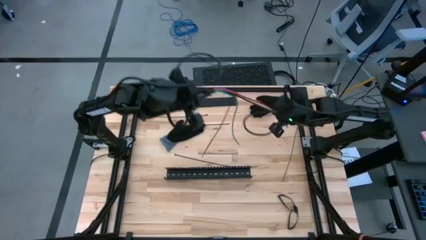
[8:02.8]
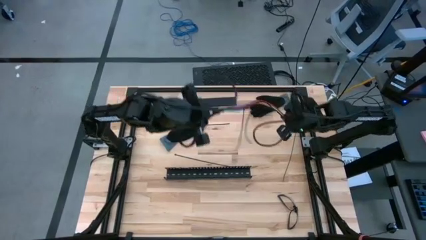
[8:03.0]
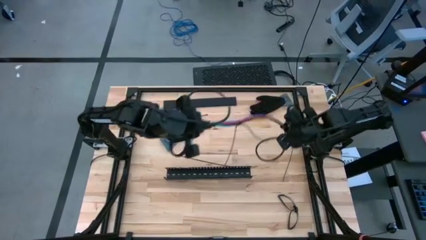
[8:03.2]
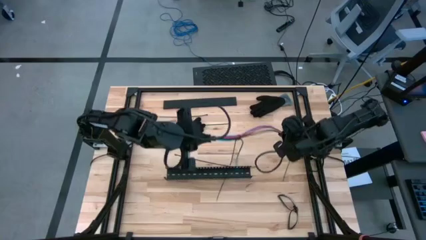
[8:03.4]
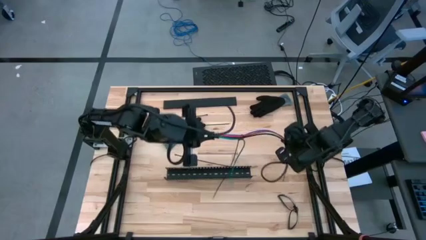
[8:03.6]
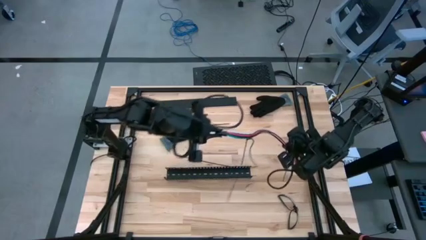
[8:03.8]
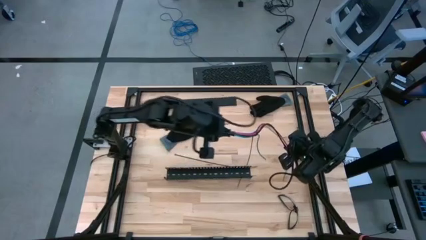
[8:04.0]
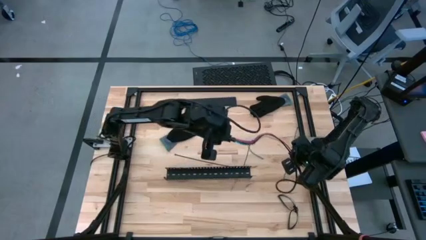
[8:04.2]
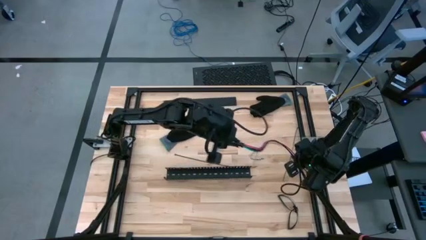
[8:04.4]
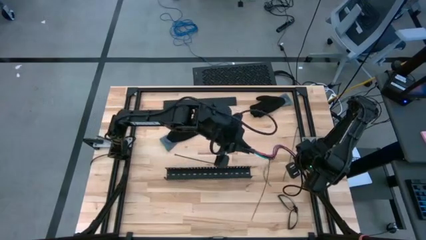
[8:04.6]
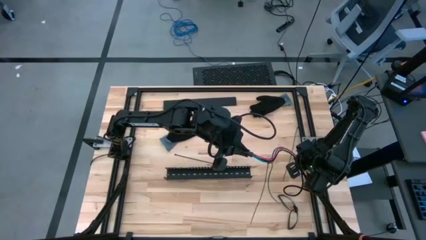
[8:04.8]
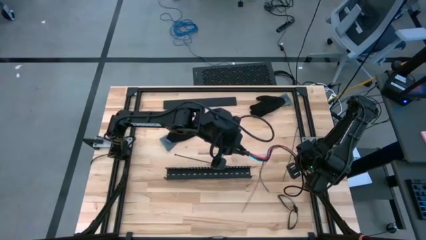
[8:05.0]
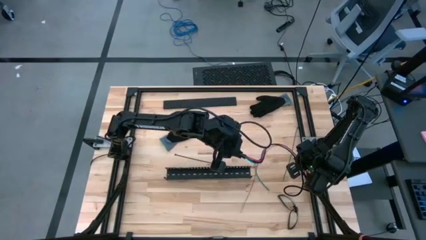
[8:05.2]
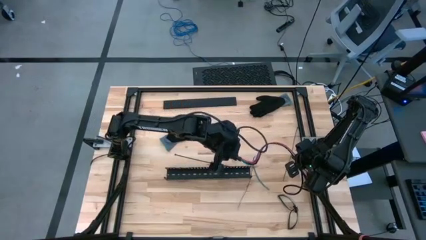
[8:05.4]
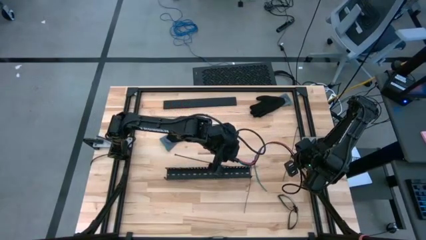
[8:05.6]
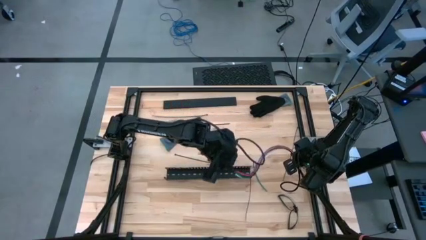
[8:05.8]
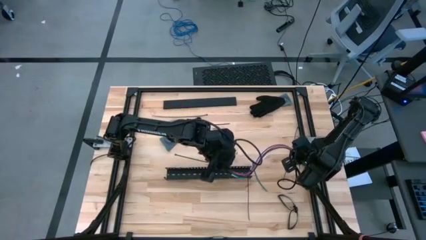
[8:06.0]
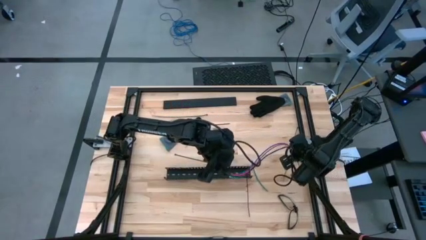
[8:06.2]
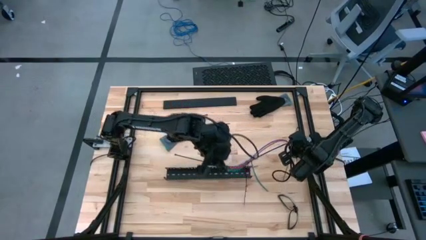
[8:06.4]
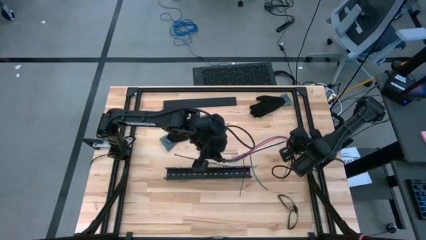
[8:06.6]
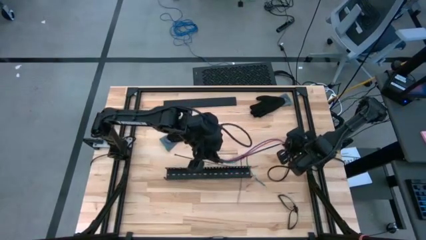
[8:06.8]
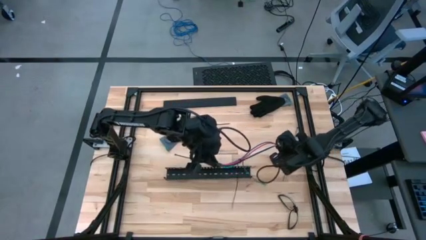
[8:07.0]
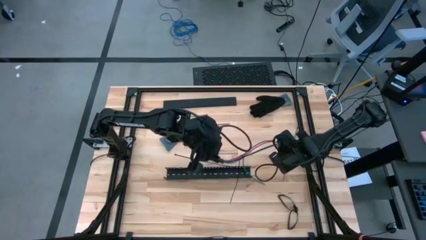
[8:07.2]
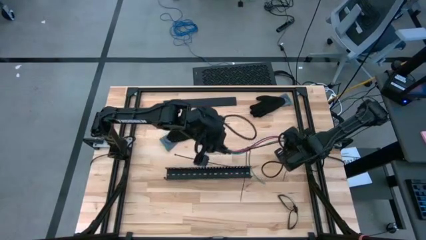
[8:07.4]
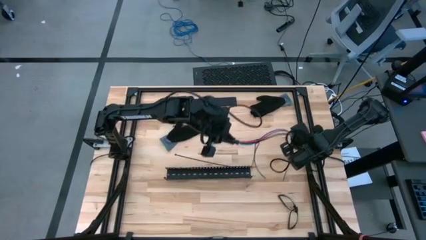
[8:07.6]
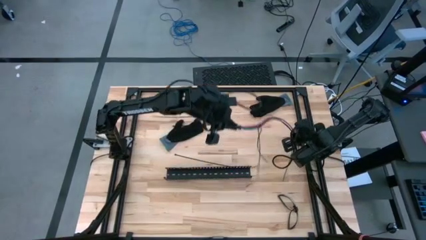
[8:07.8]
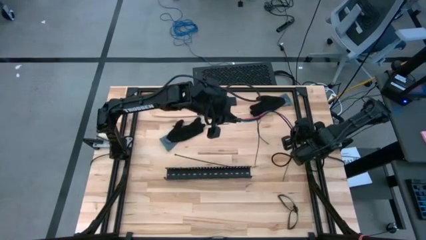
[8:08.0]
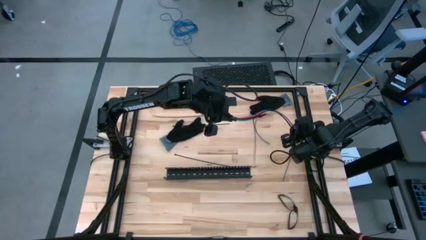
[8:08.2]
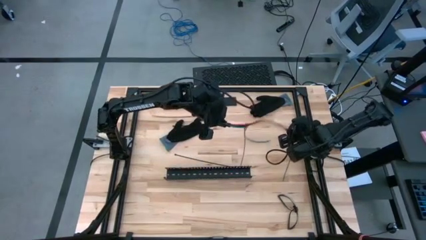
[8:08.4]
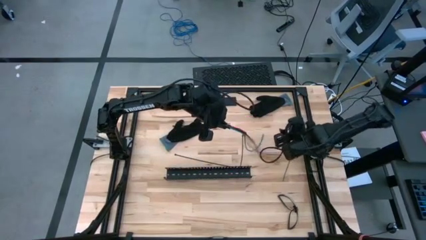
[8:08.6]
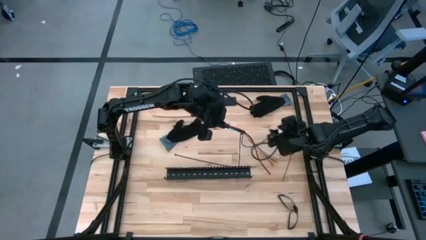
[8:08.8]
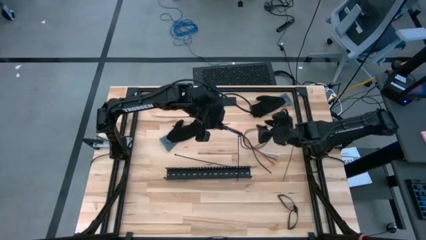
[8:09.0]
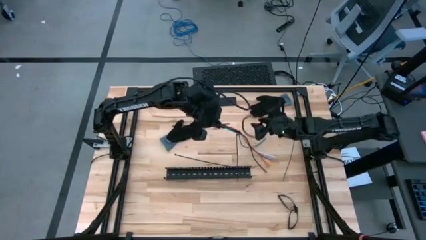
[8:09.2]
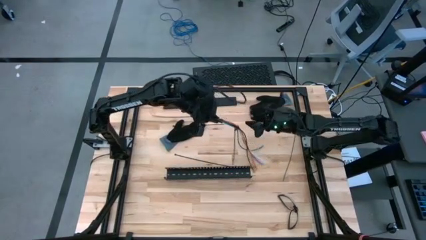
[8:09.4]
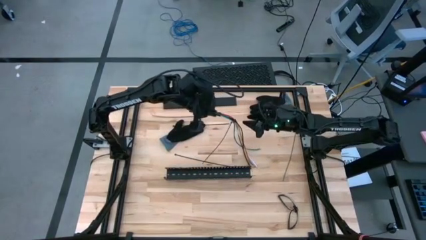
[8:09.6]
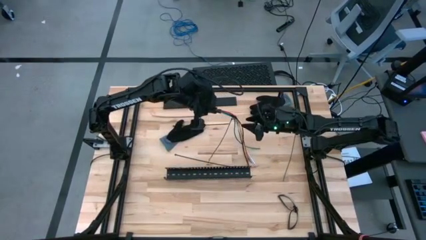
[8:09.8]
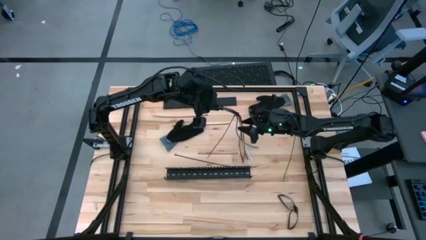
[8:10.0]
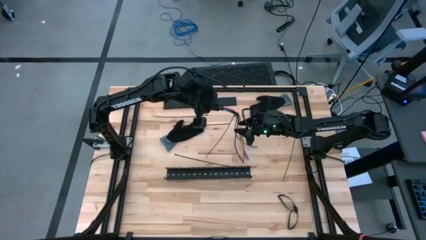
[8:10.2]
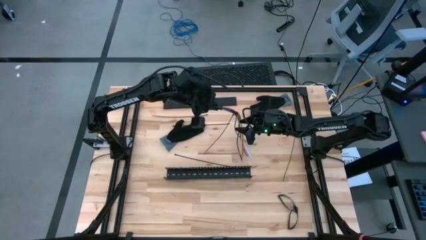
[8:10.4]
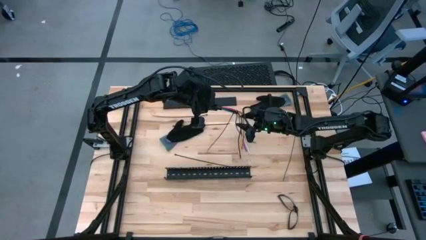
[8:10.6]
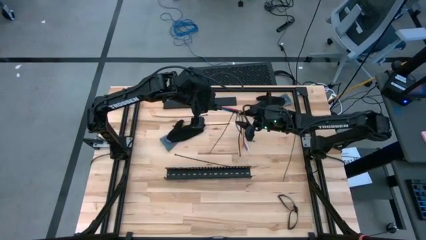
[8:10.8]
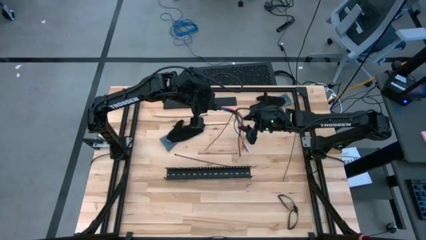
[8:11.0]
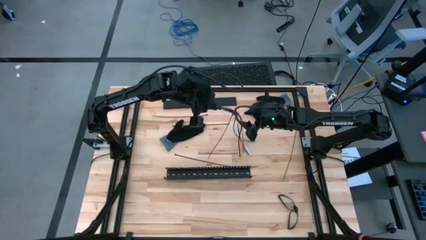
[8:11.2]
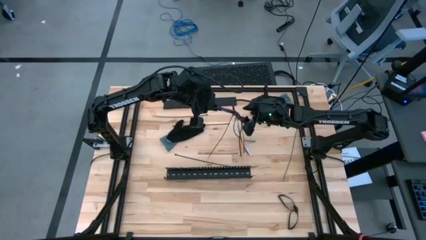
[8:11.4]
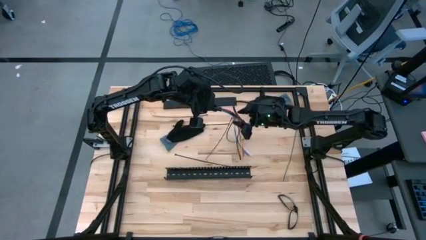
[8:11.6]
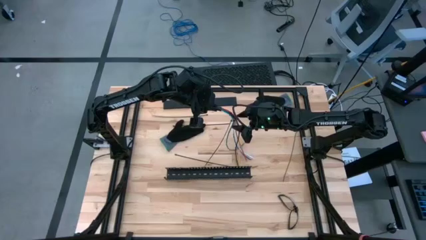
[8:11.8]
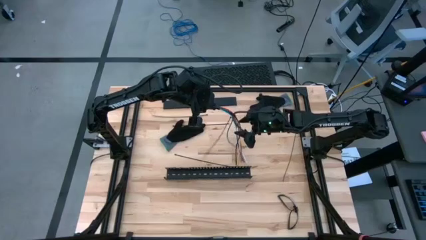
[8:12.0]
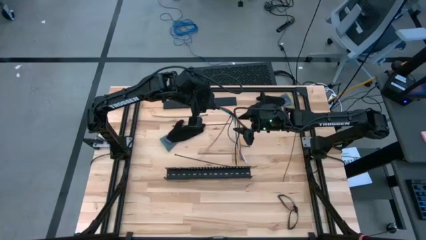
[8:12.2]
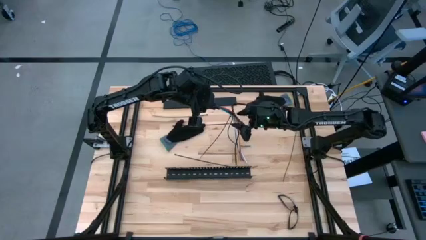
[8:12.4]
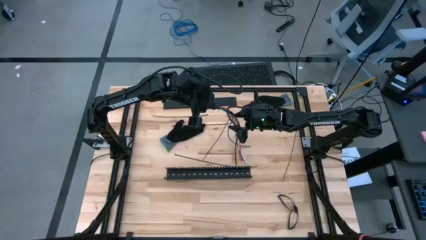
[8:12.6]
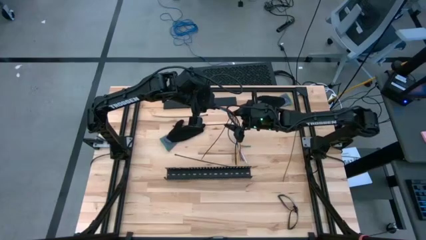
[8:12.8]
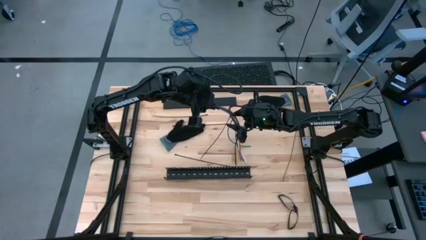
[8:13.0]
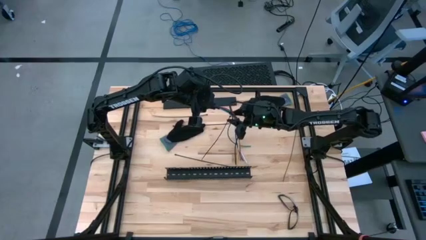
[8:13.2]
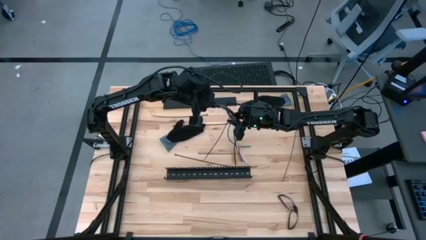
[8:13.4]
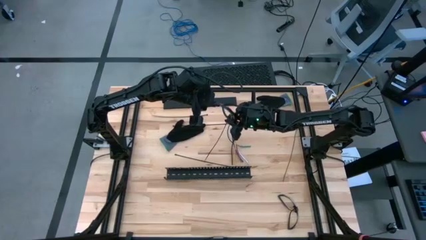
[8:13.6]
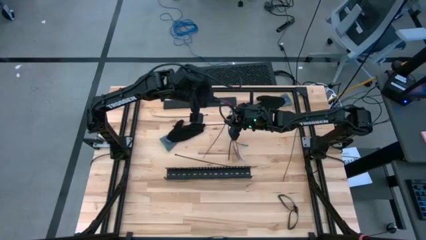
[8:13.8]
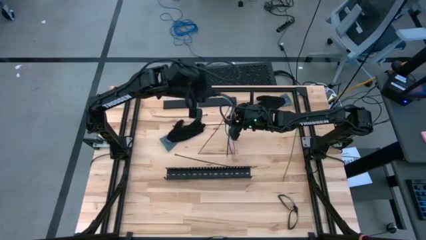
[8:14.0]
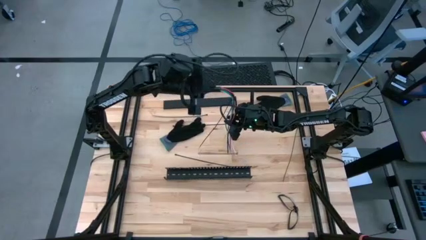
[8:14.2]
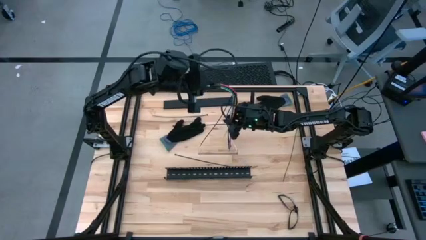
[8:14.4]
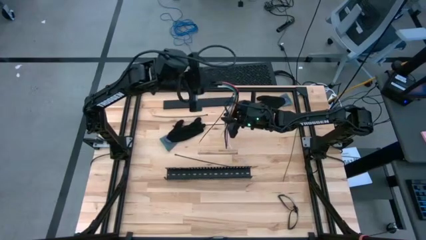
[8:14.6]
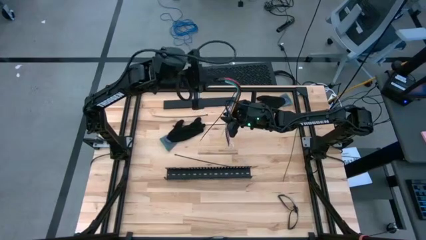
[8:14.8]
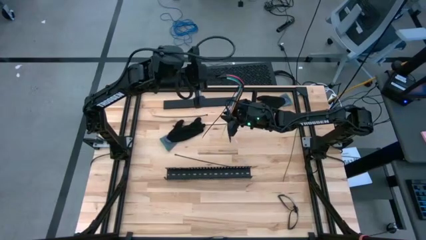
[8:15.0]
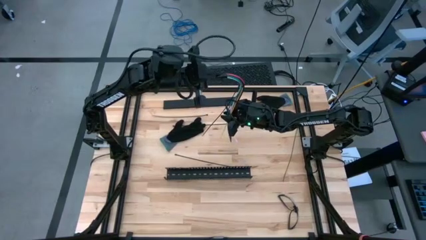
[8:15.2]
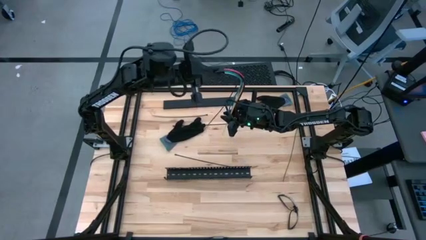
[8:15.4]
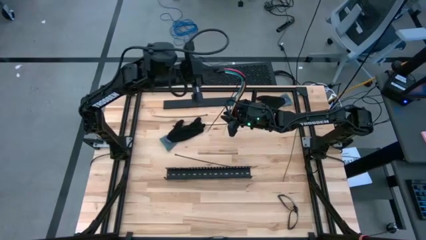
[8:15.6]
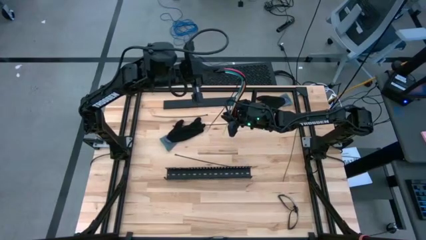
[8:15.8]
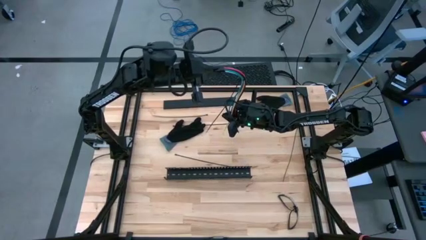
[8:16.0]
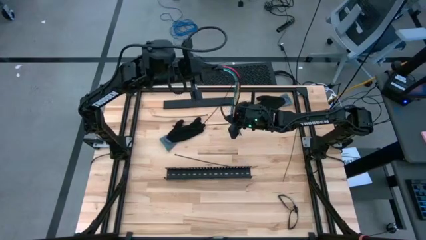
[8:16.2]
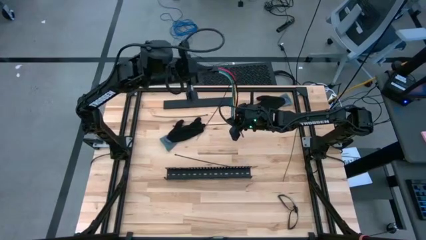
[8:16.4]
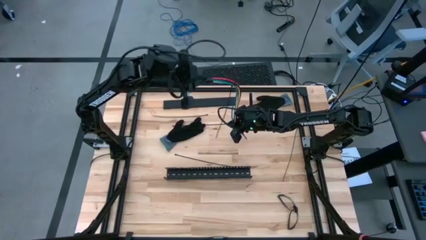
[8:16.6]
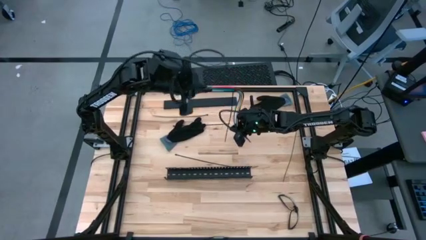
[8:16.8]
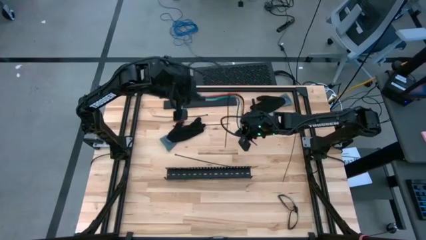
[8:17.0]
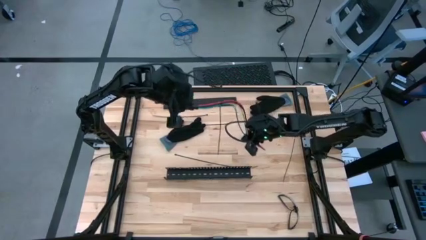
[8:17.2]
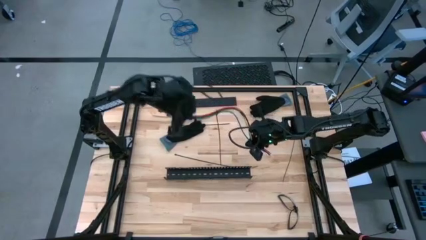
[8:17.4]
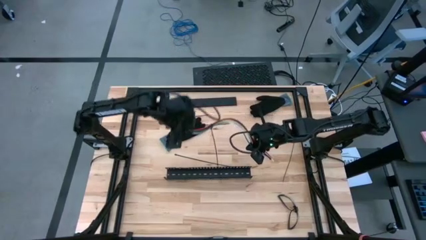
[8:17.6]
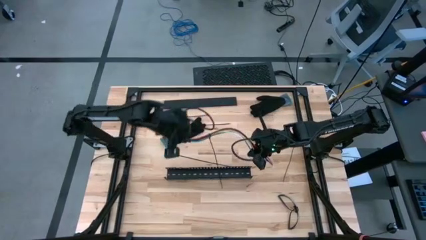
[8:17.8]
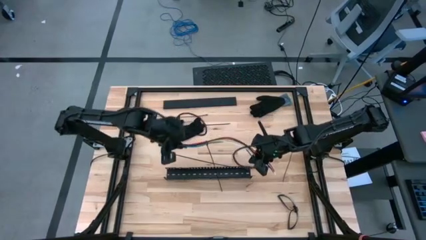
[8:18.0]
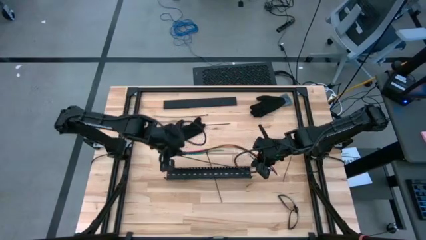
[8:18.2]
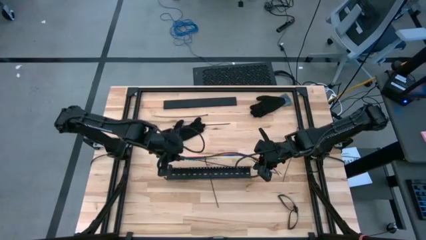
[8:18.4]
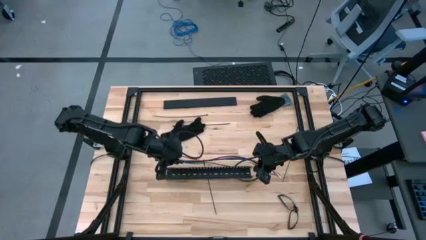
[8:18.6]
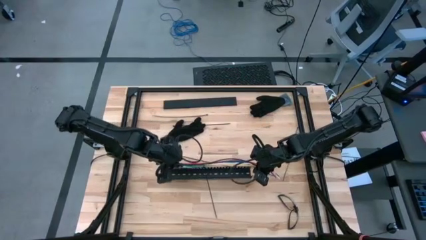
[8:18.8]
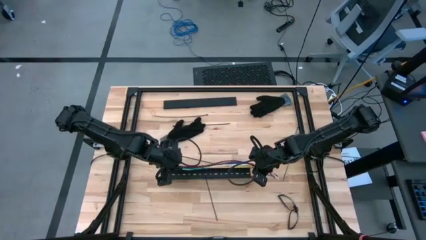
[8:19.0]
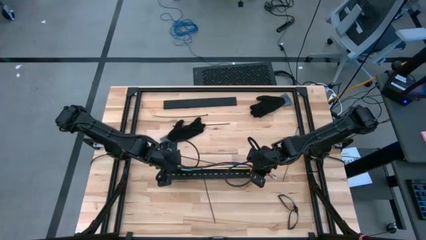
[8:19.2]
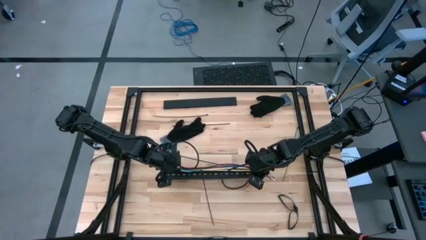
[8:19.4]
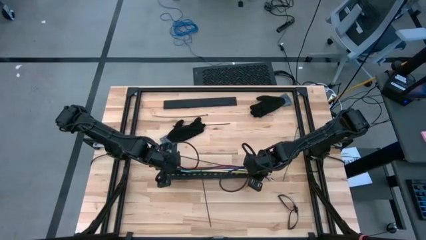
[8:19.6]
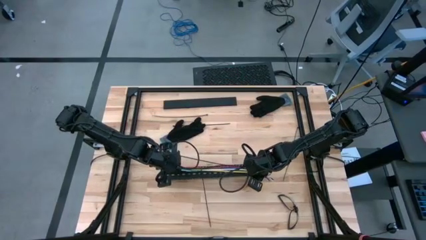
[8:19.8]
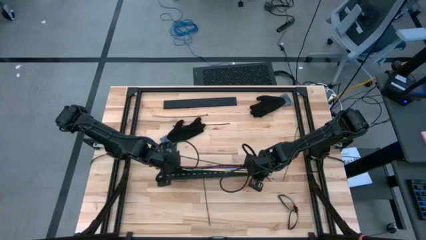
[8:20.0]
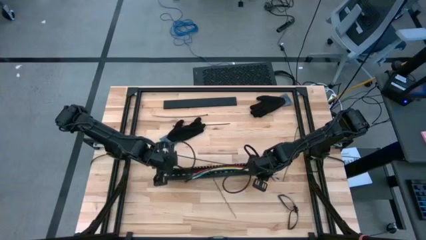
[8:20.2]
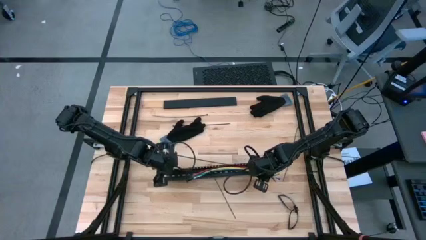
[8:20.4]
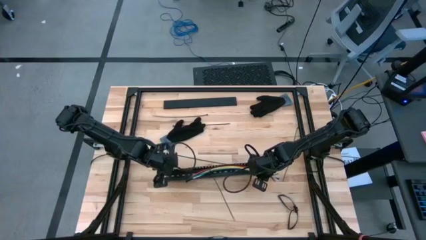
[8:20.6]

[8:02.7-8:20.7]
Task: Ziptie cables
Put the zip tied cabled wires into the cable duct
